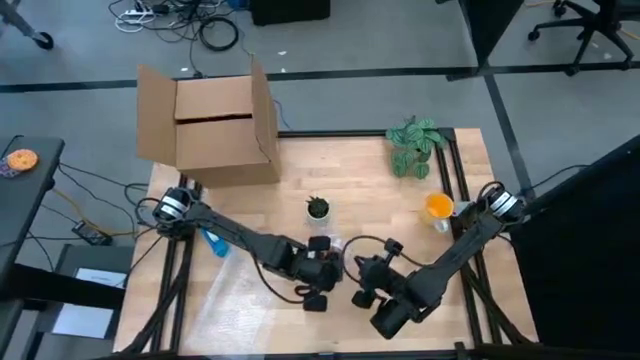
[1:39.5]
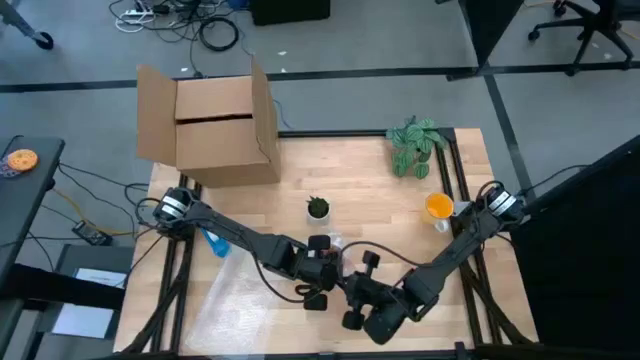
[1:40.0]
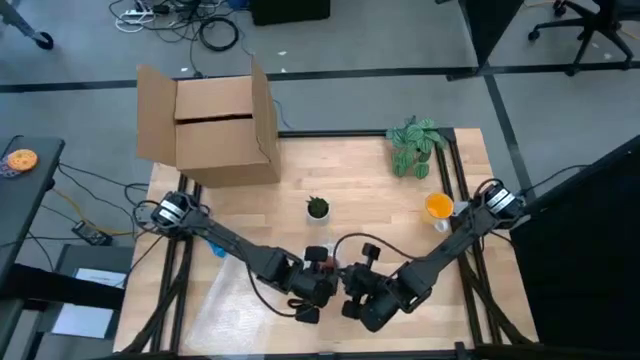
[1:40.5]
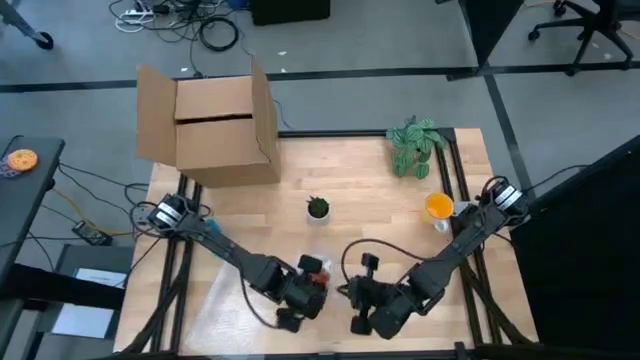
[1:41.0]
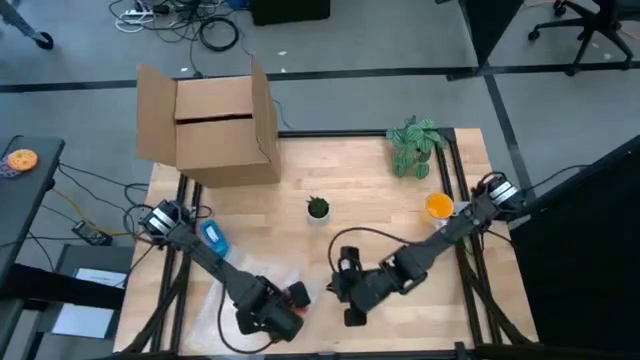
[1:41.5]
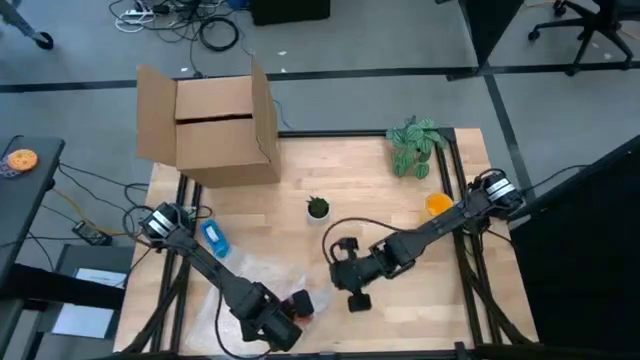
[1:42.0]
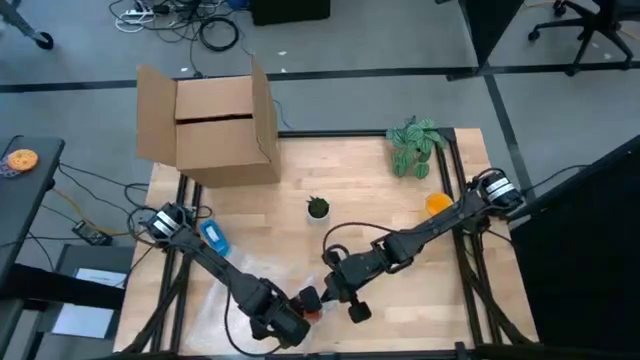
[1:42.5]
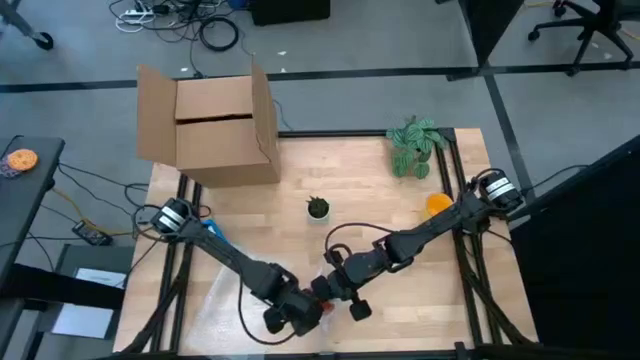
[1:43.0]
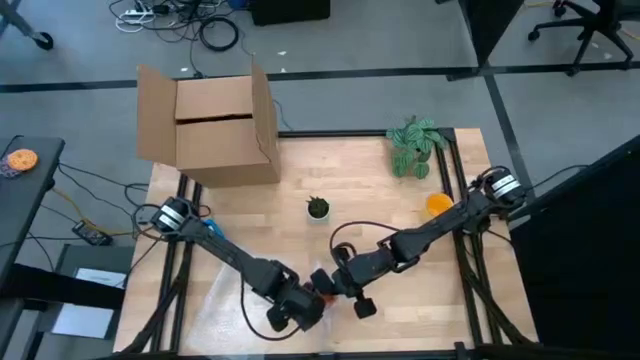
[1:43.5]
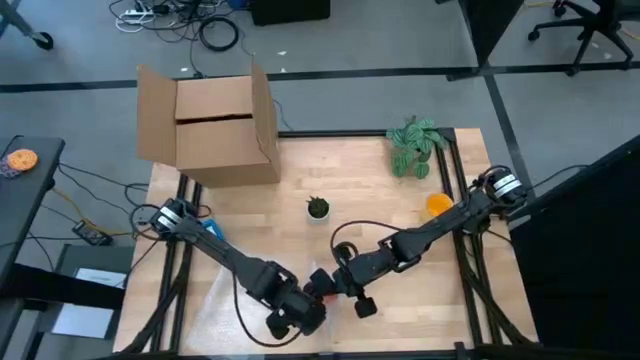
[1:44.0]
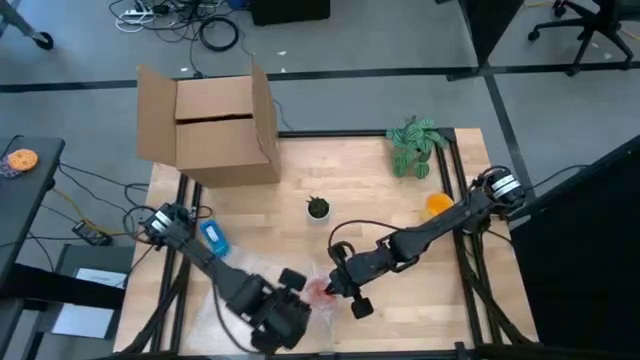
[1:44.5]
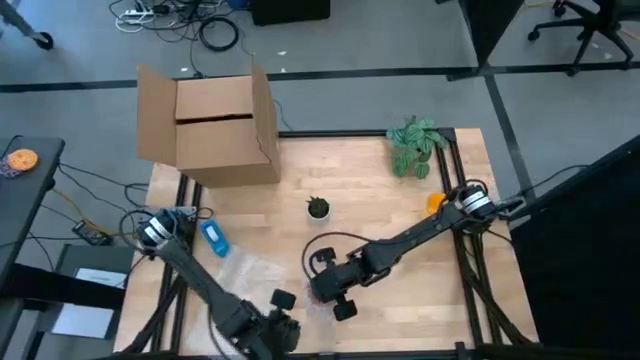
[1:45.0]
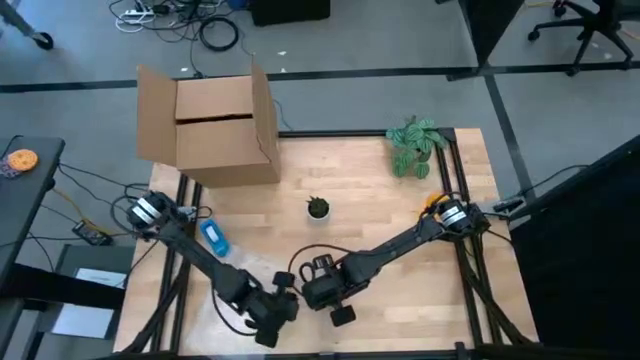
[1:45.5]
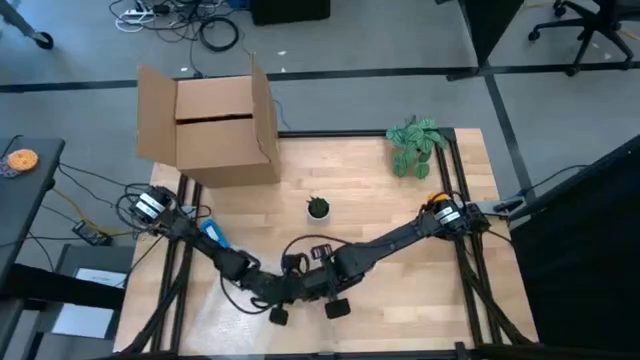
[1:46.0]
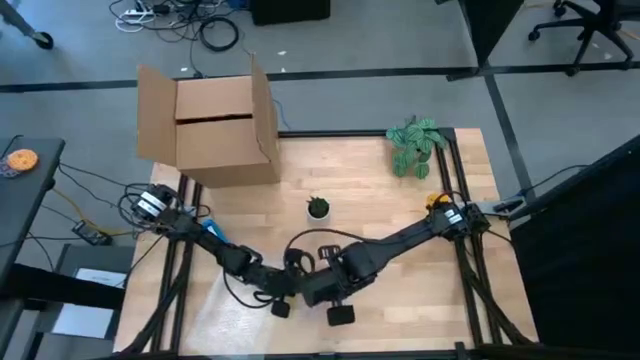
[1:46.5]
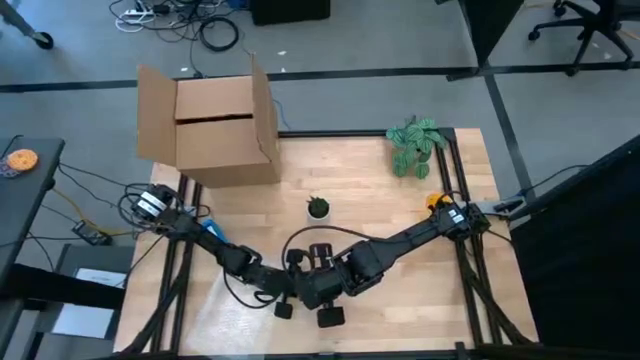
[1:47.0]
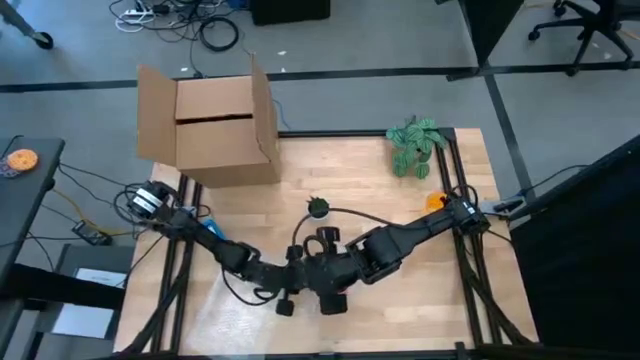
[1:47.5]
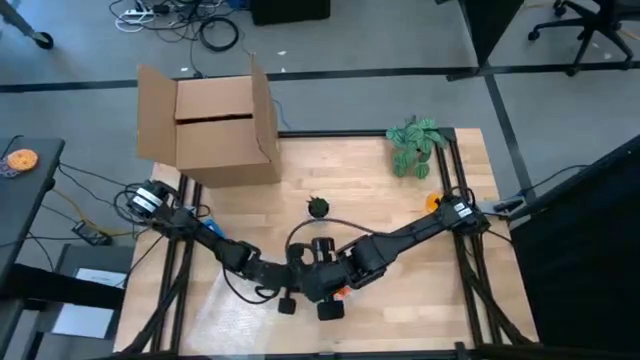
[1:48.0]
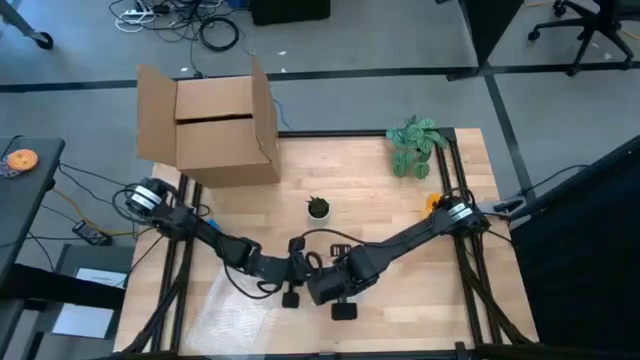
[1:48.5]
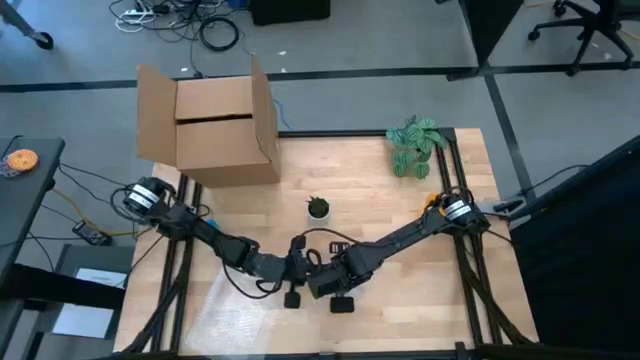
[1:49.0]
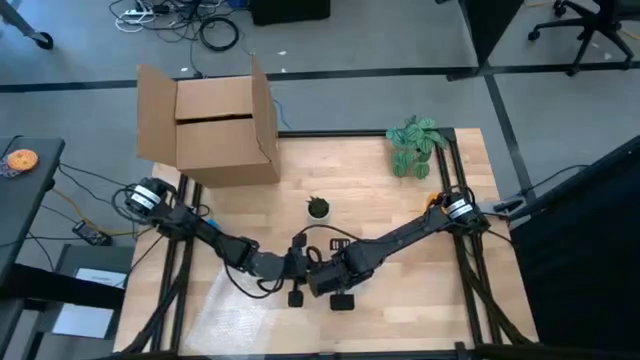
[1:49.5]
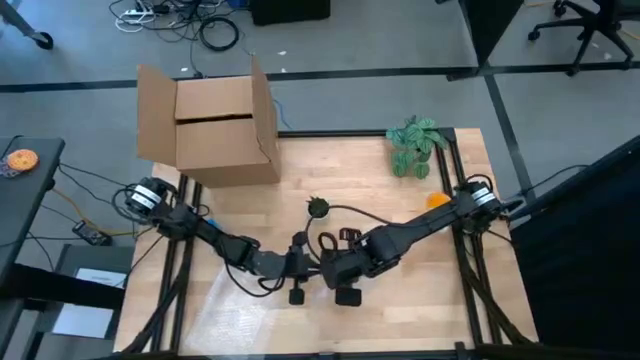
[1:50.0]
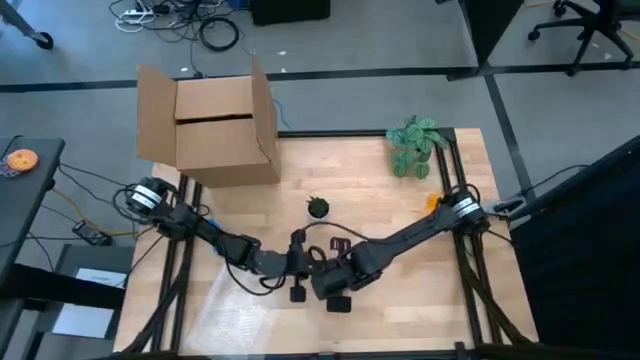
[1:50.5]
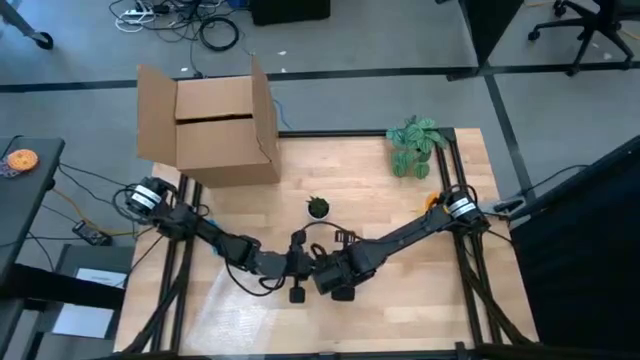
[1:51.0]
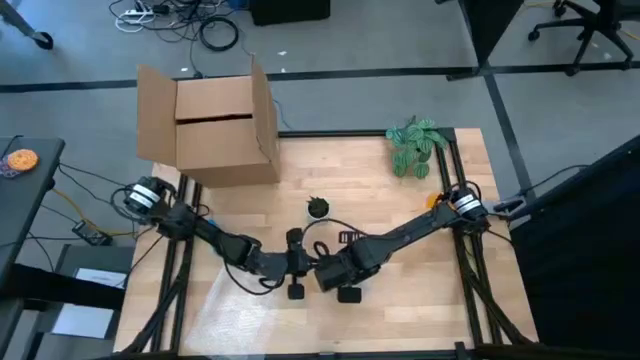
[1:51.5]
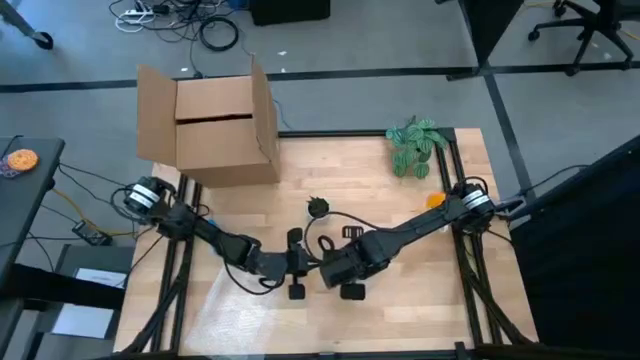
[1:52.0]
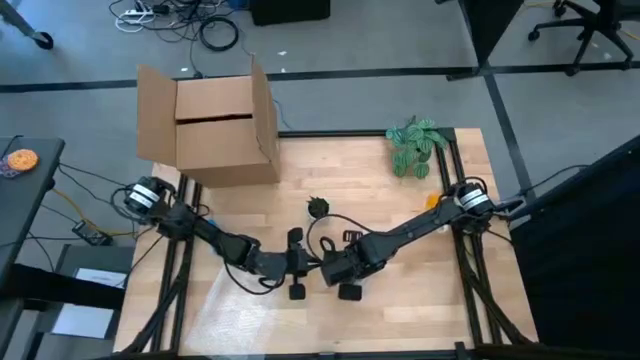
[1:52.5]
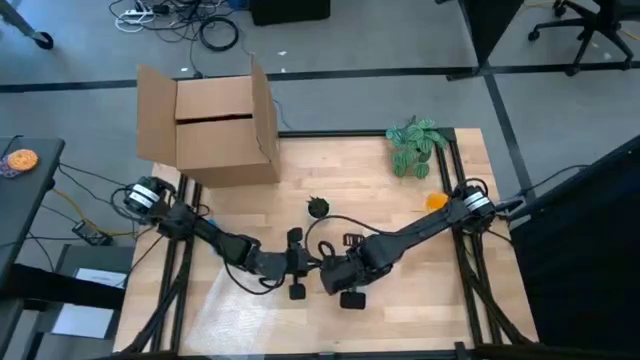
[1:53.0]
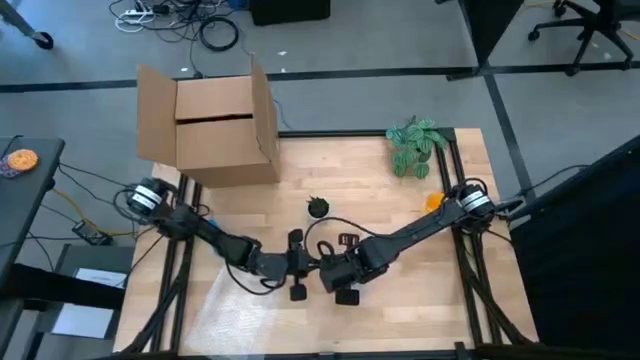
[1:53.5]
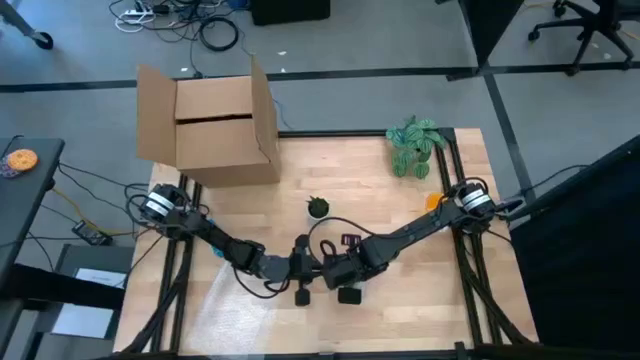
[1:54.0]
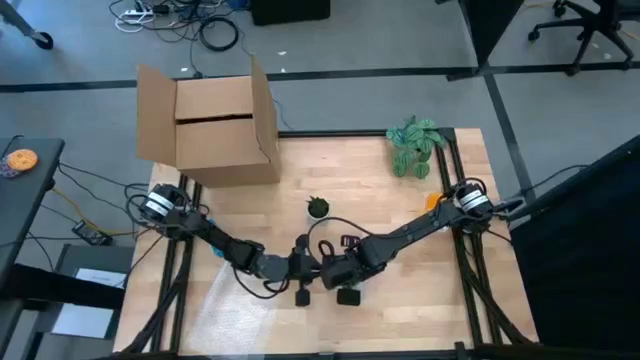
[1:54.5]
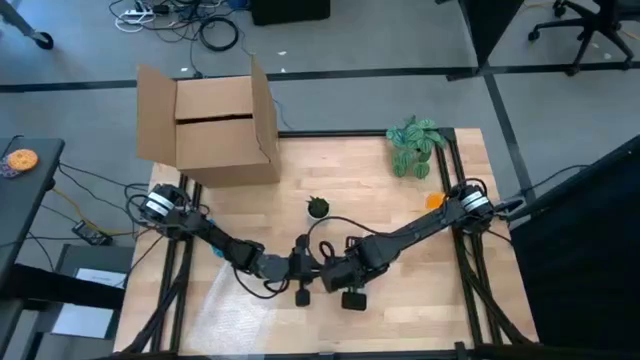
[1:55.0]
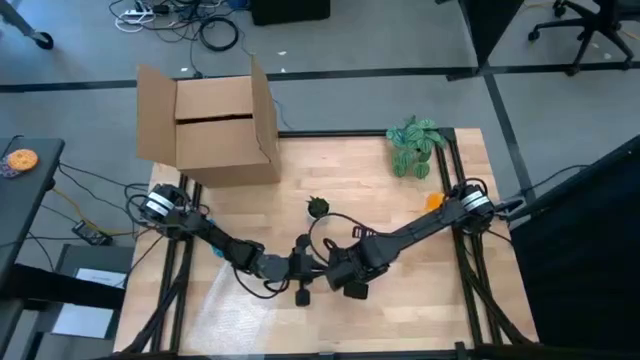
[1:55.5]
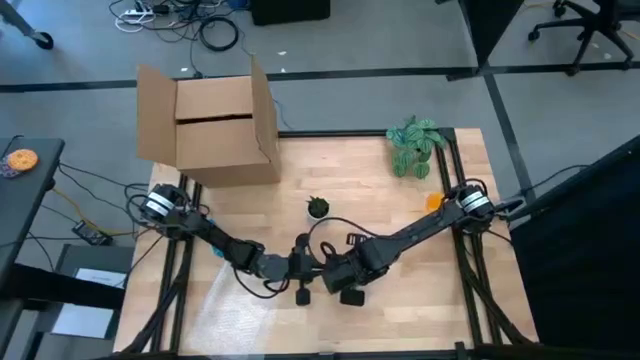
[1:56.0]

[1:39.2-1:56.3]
Task: wrap mug
Wrap the orange mug with the transparent bubble wrap
